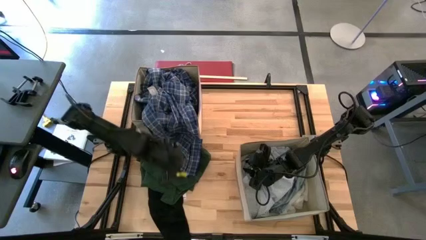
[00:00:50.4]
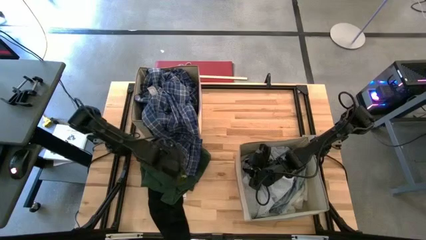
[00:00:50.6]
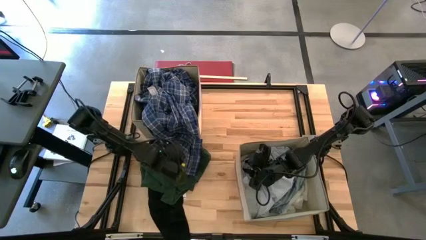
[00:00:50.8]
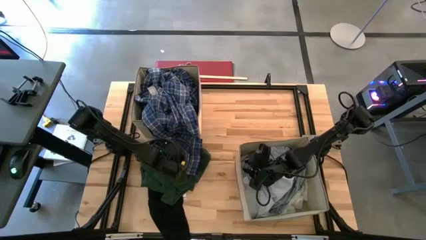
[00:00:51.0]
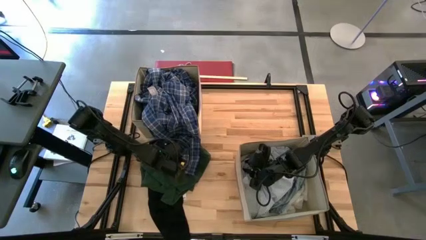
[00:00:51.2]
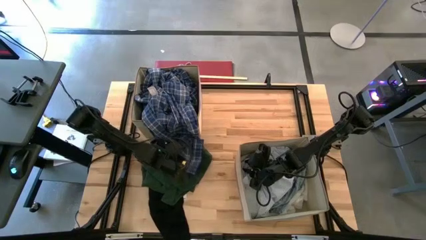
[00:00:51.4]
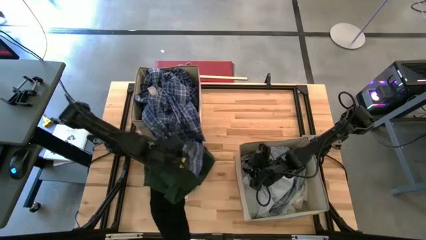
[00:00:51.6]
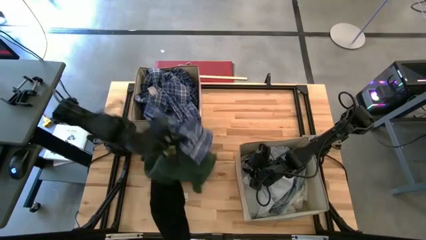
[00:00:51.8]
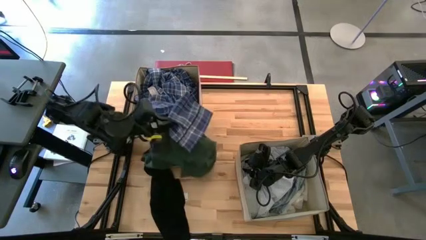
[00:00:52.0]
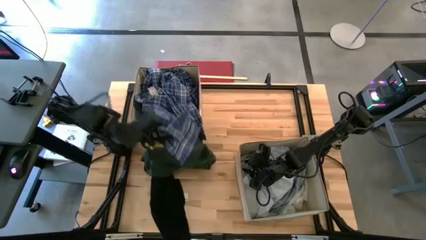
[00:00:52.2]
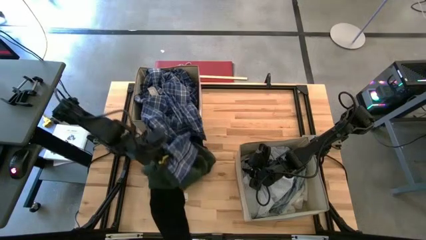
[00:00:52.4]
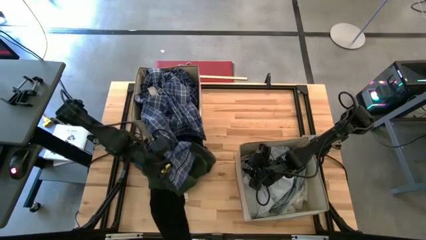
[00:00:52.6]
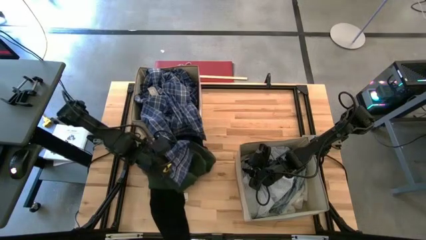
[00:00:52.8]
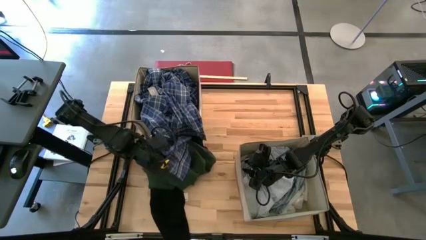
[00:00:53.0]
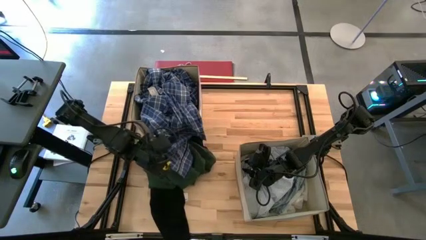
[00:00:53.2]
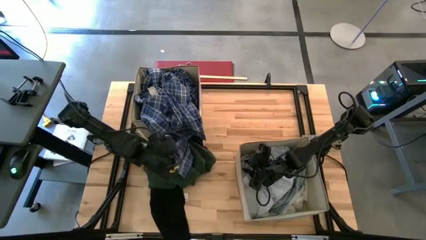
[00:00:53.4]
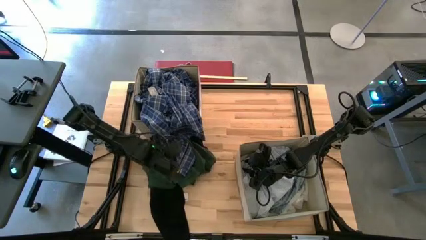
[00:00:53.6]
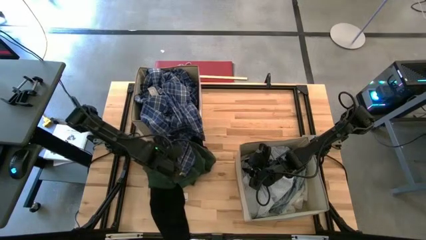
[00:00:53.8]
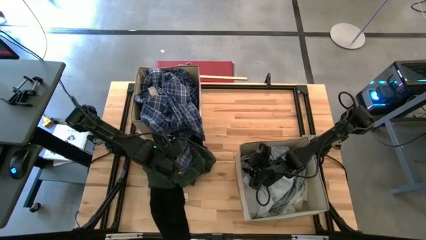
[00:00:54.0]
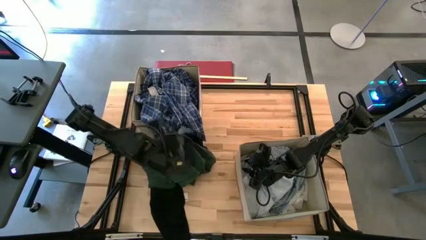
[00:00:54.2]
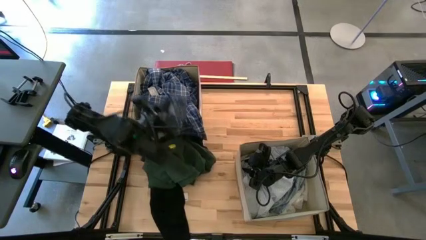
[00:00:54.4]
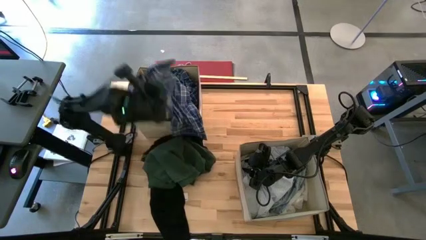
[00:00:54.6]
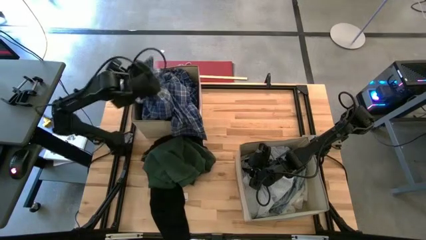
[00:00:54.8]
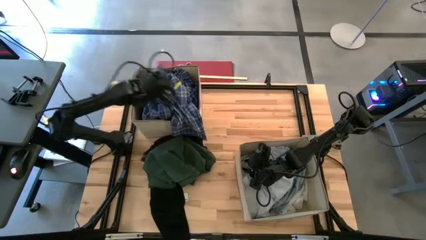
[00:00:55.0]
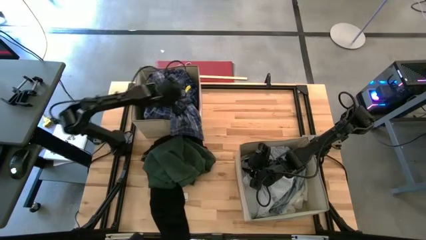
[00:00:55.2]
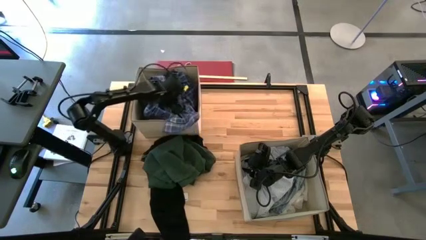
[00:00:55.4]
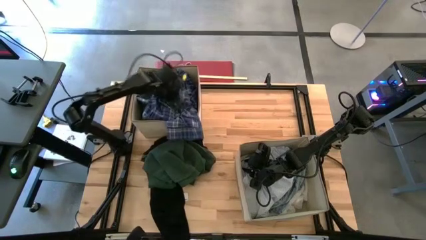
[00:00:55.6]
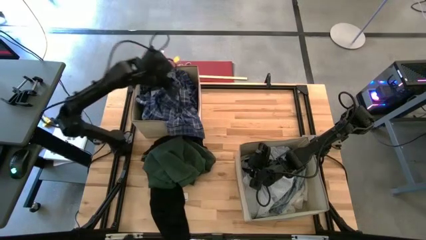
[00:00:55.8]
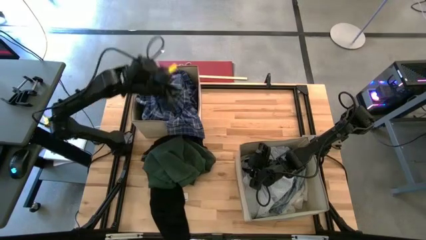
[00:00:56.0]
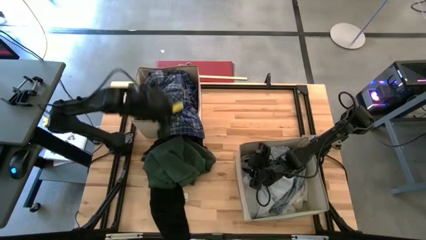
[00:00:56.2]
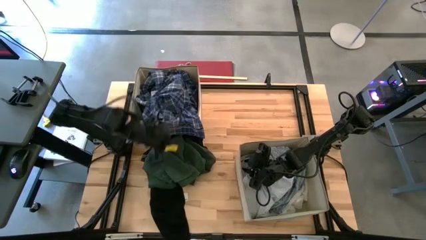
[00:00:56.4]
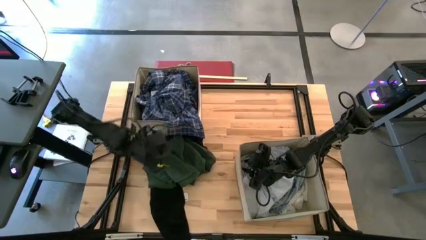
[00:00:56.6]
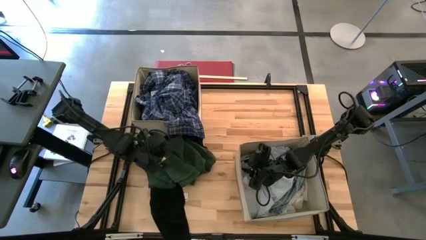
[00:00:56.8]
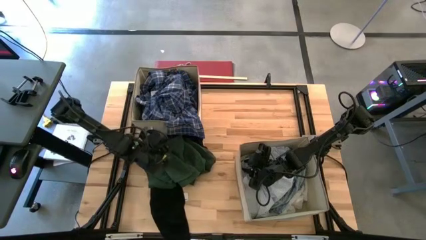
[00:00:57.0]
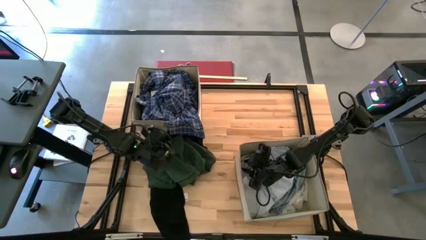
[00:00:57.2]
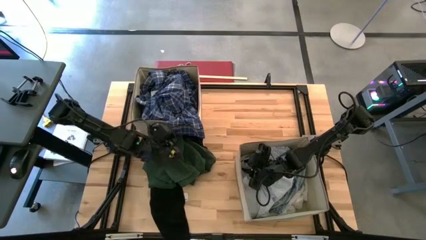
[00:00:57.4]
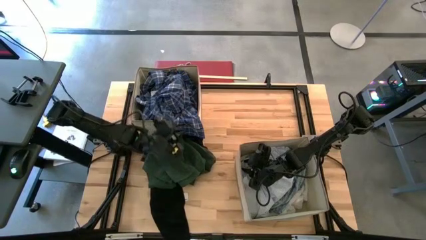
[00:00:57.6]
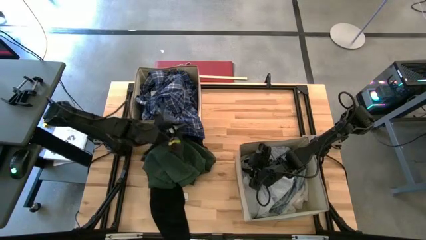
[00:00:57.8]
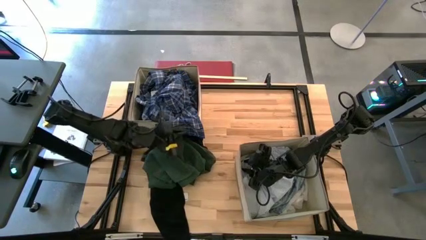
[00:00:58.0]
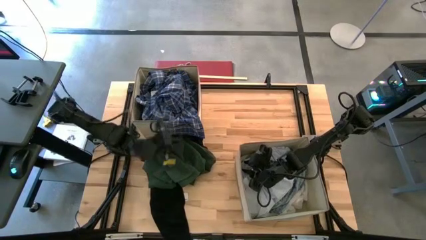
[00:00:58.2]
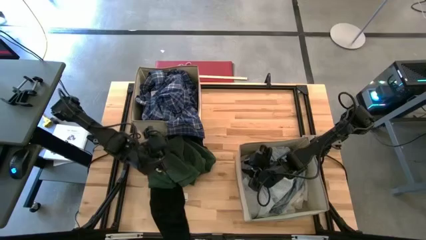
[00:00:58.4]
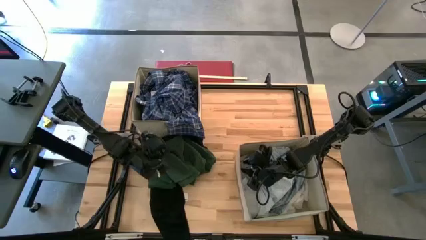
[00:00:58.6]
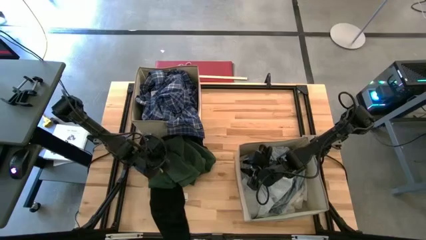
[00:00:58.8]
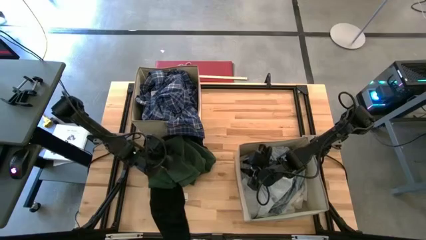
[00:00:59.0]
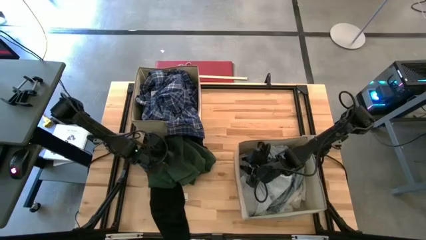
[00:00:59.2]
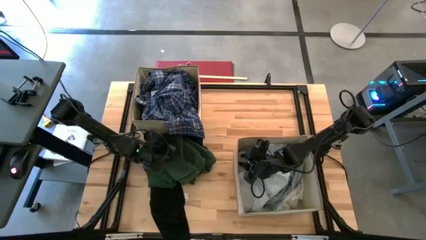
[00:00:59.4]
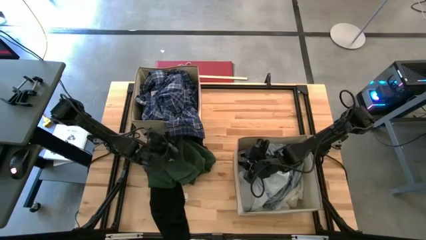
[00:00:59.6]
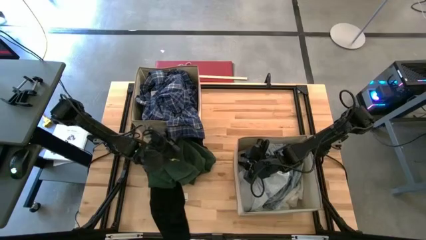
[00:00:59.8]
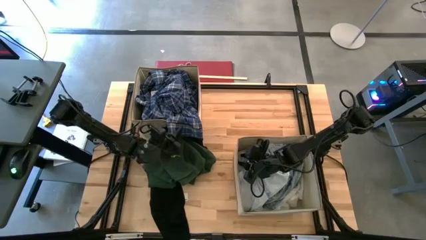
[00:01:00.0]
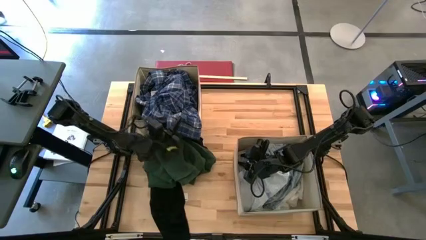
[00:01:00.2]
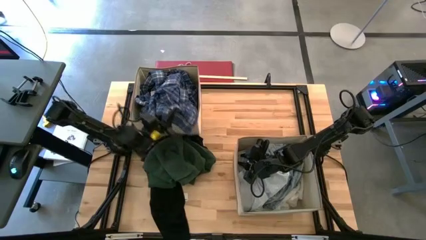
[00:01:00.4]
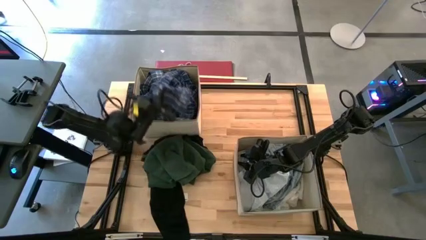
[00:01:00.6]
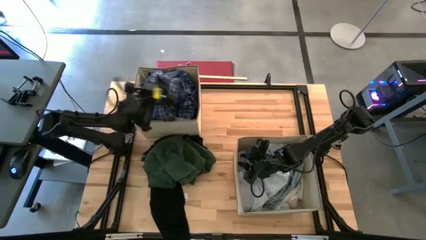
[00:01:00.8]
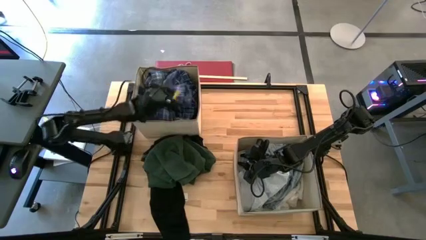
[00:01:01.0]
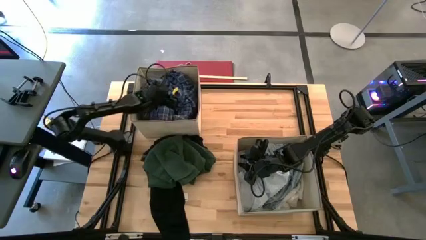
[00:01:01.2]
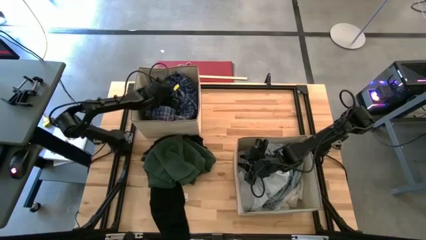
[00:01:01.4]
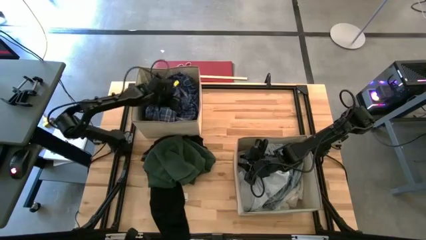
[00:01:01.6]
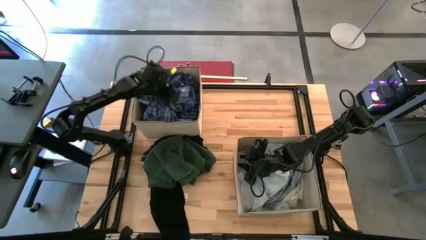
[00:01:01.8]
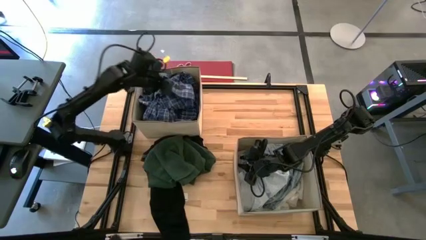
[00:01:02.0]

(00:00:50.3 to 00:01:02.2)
Task: Sort clothes
Put the blue shirt into the top laundry bin

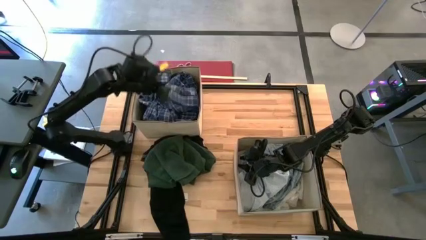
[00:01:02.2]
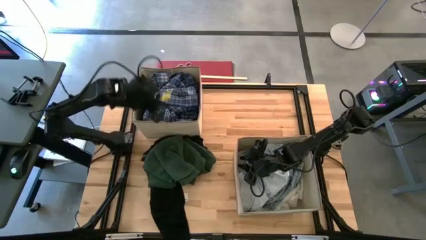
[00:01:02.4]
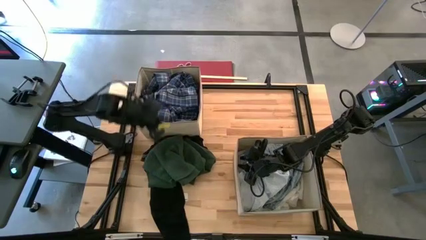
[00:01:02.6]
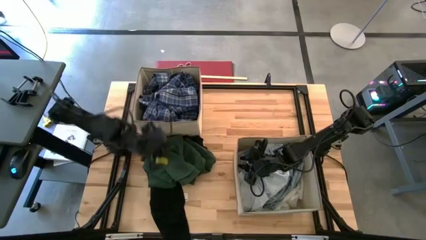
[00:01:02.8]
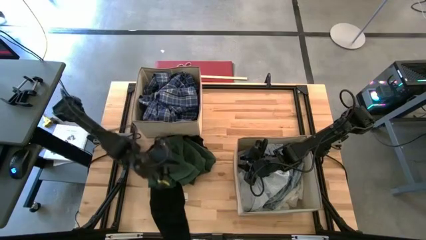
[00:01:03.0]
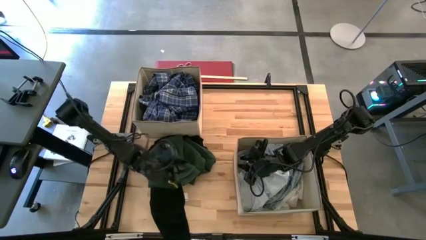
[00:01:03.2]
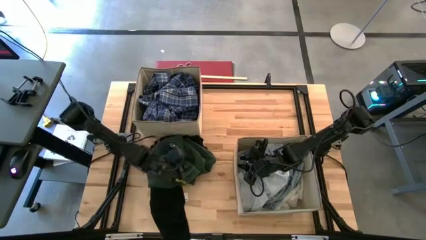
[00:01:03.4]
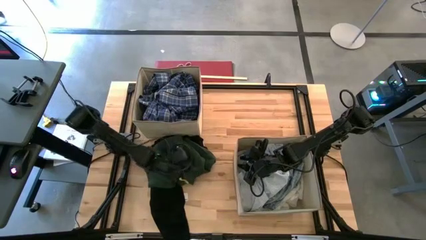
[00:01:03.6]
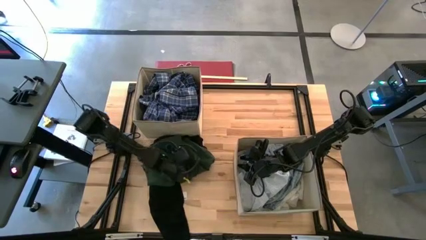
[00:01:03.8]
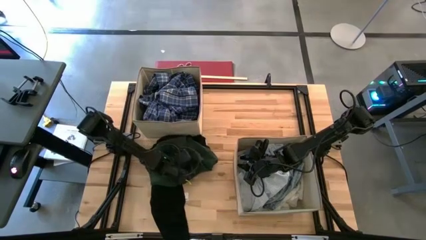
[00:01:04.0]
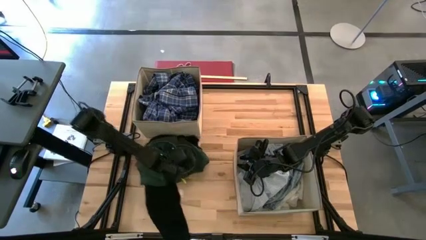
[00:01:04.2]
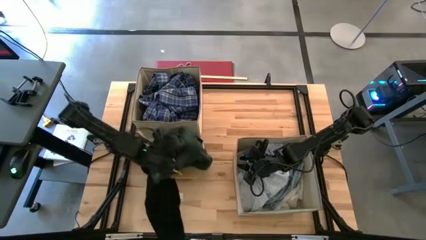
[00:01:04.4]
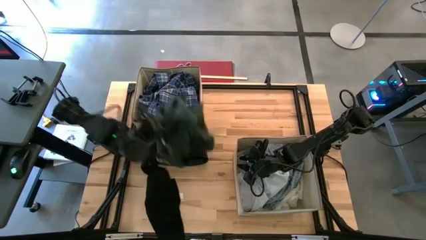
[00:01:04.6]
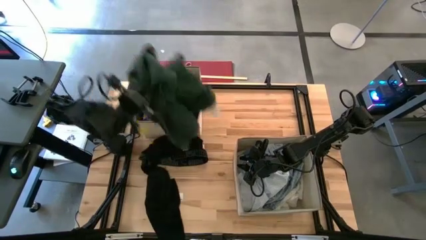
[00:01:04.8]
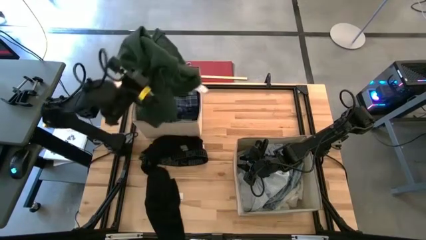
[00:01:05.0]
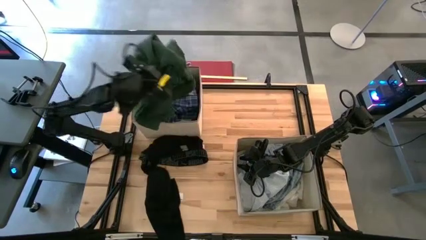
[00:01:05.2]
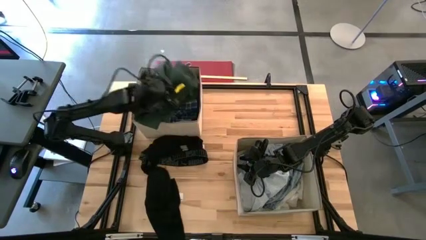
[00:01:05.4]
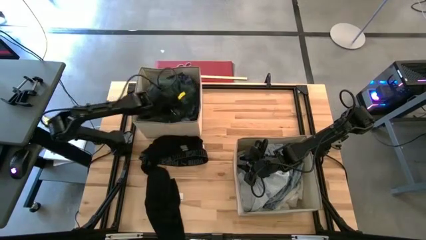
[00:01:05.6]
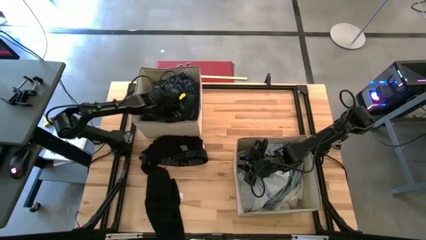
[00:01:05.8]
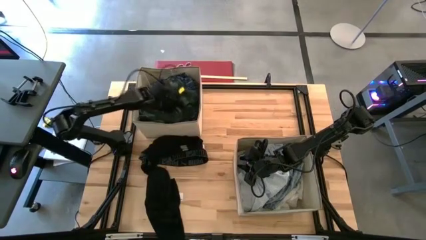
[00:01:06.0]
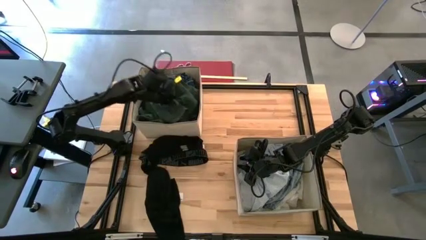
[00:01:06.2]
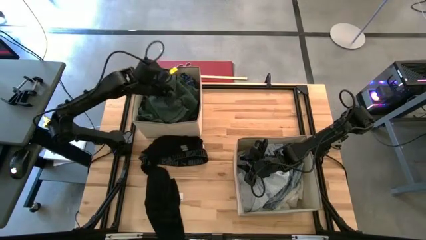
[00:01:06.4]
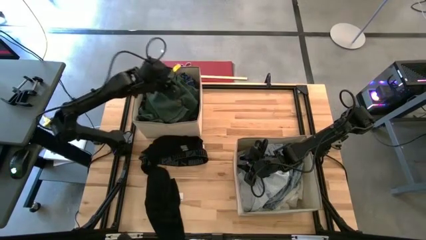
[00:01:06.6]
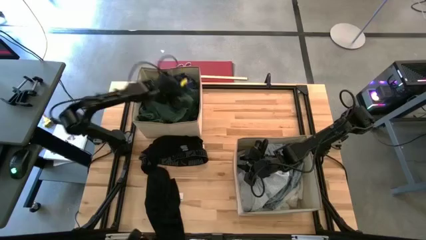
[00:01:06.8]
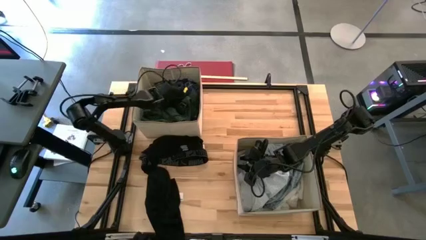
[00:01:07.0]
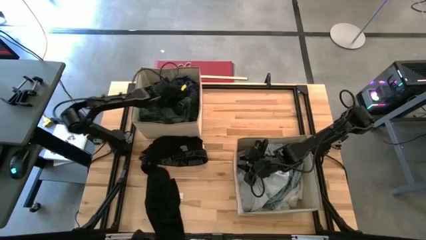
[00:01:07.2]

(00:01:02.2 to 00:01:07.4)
Put the green cloth into the top laundry bin
